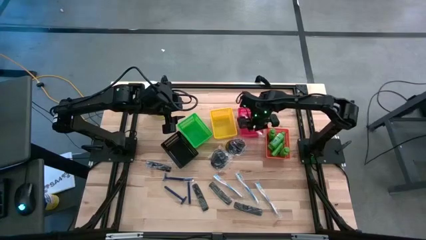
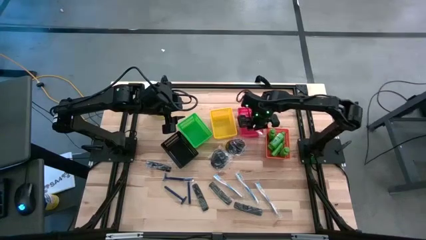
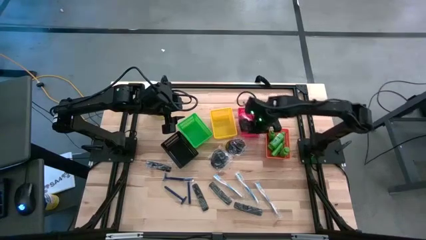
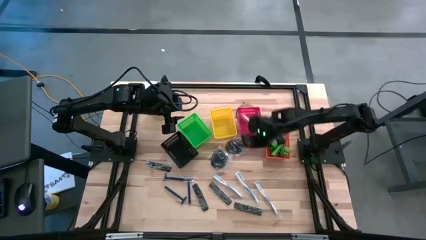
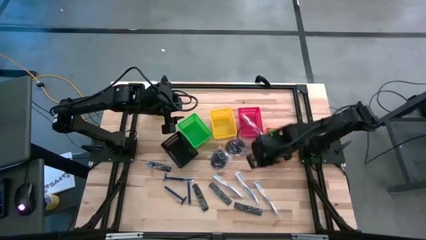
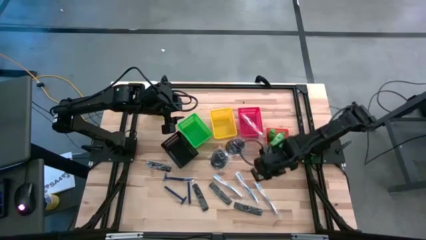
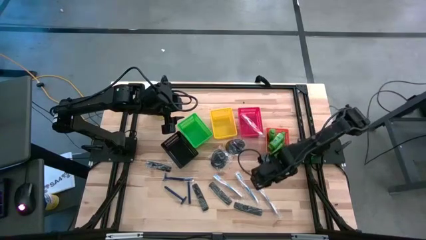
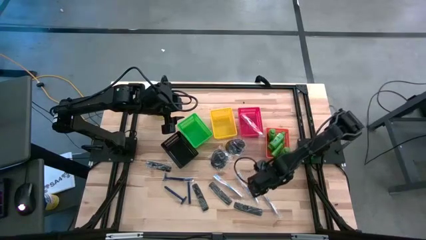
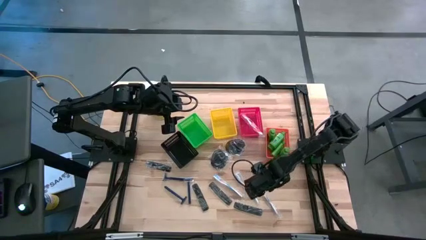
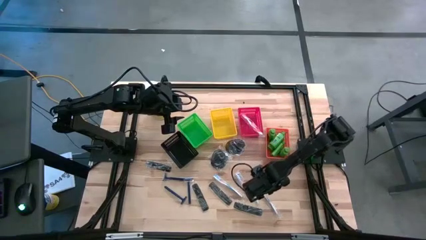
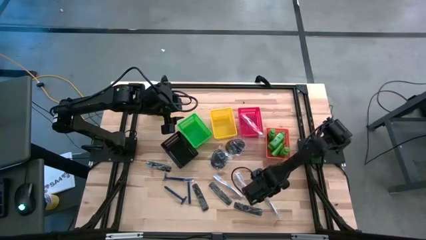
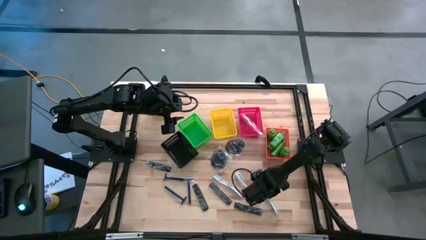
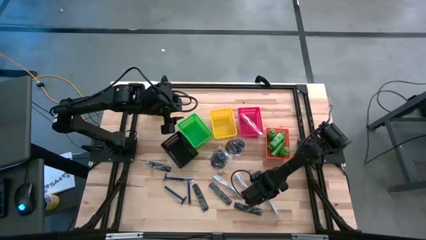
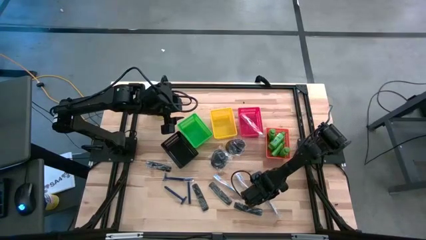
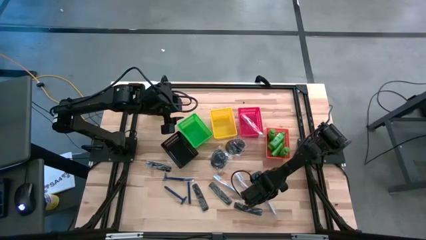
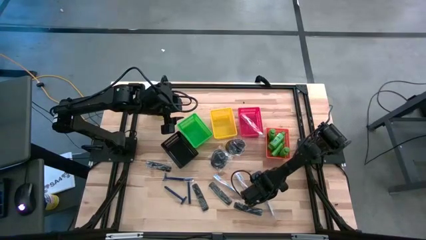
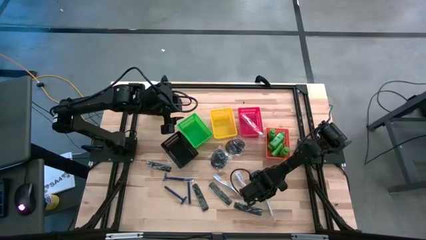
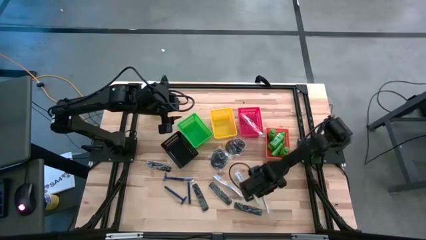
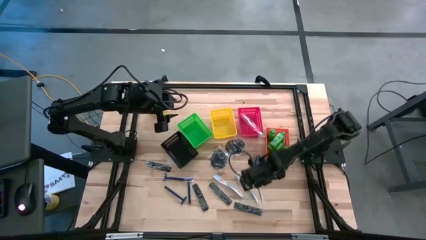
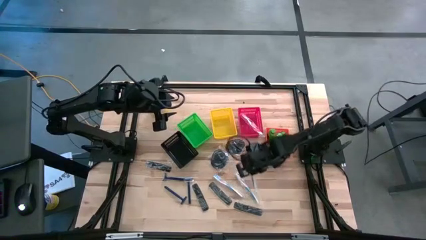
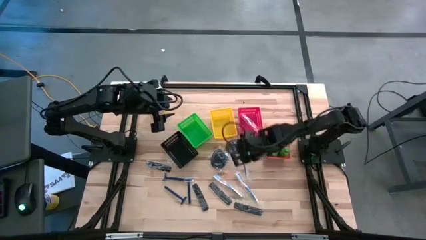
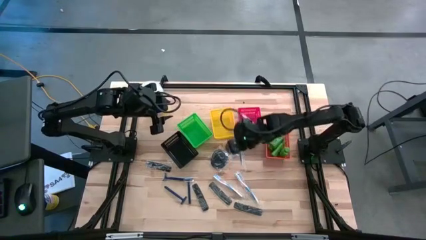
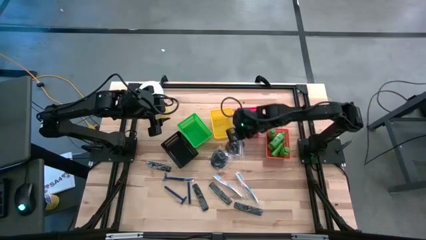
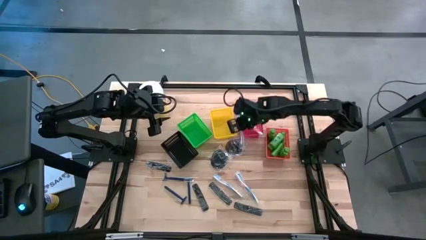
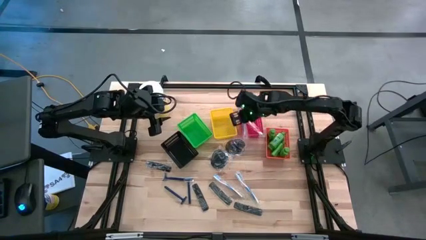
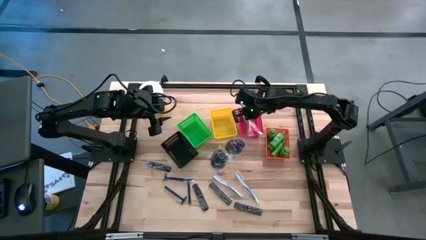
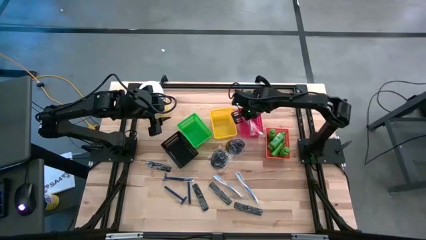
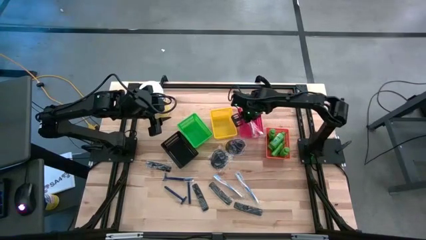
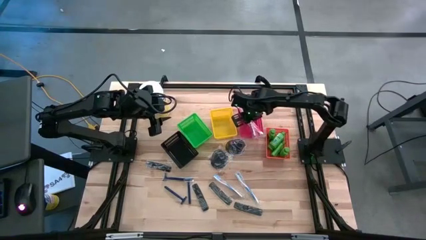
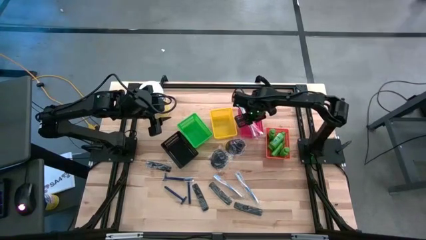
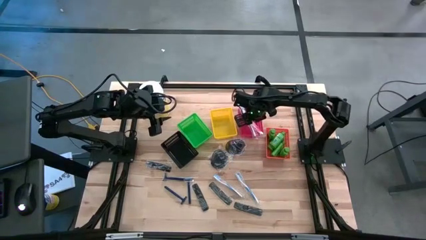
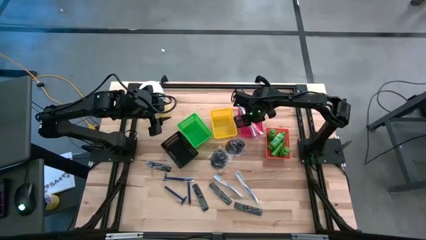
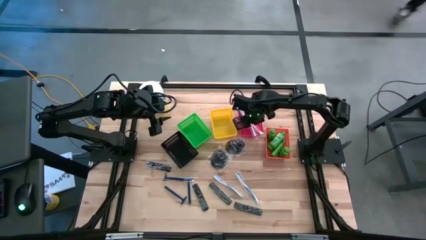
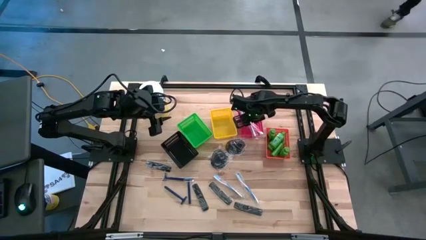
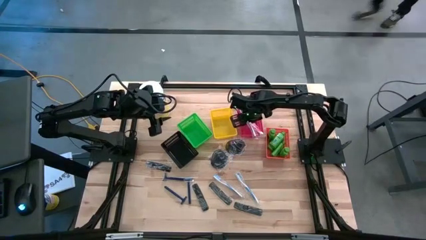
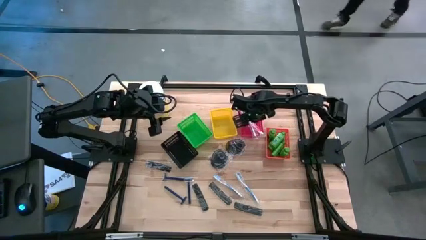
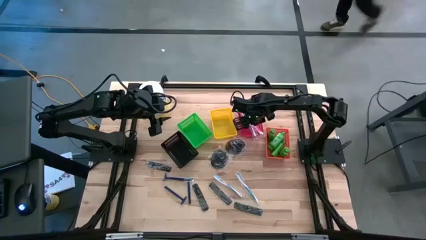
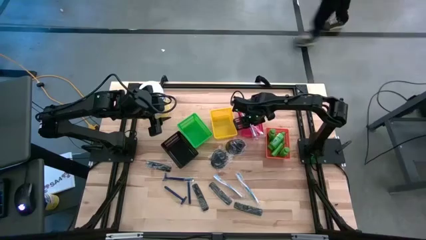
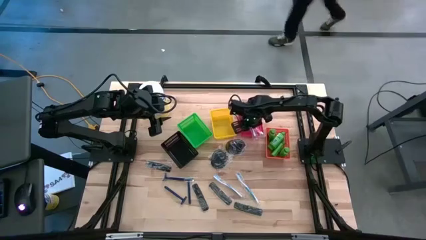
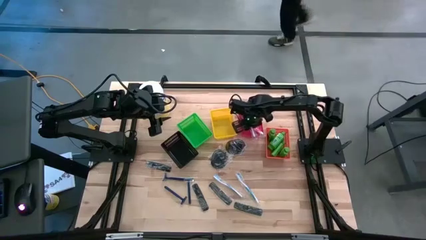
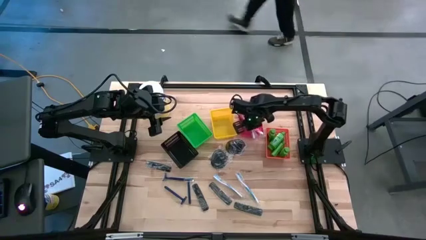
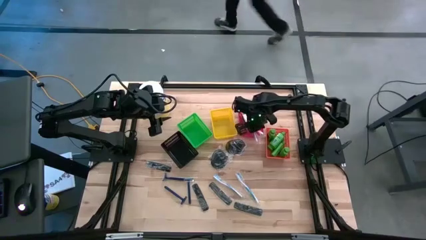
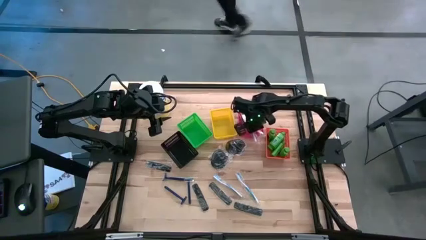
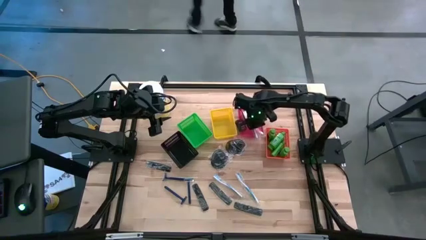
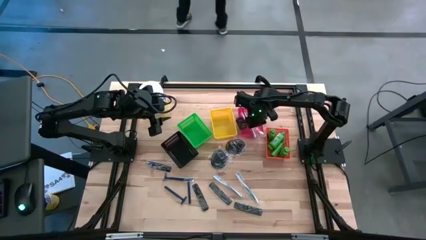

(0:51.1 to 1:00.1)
Task: Pick & Place Travel size toiletries
Put the blue toothbrush into the red bin

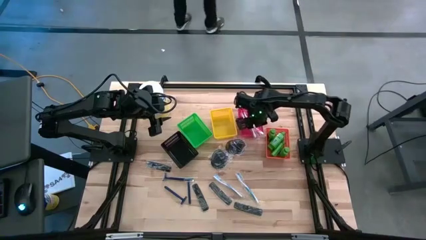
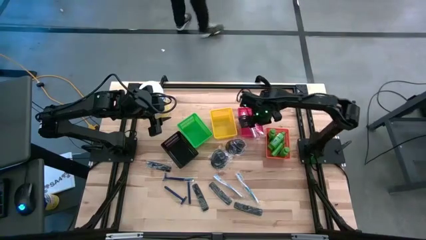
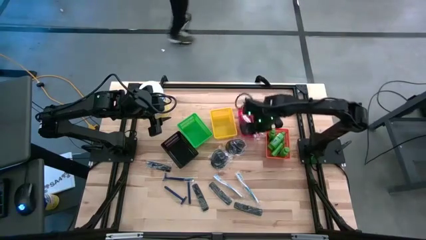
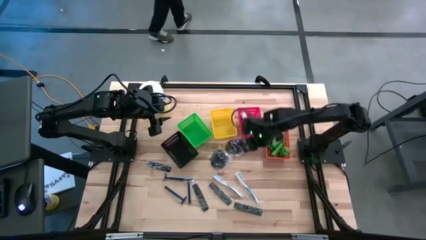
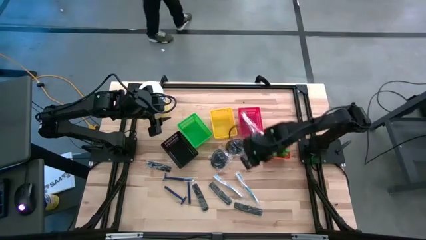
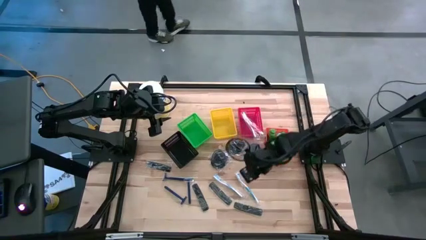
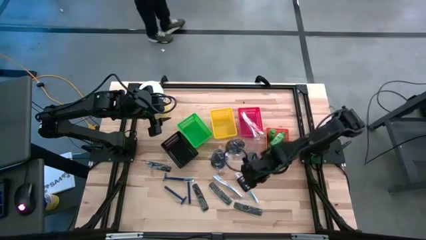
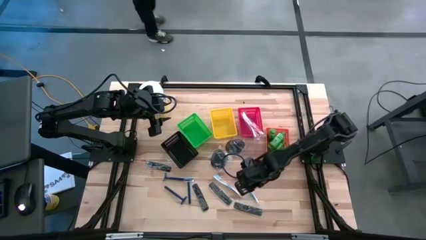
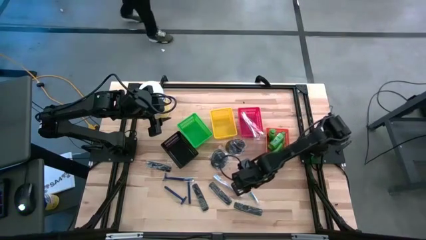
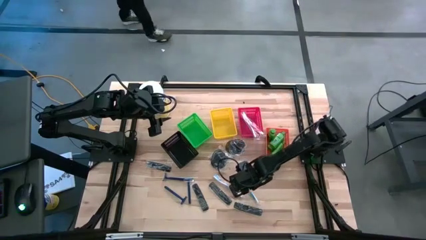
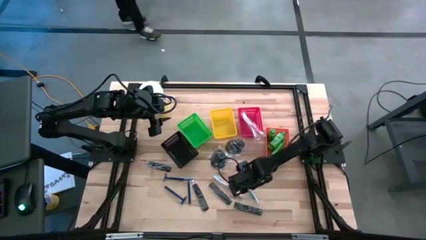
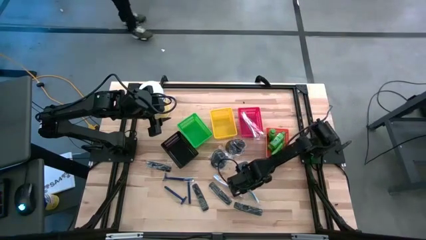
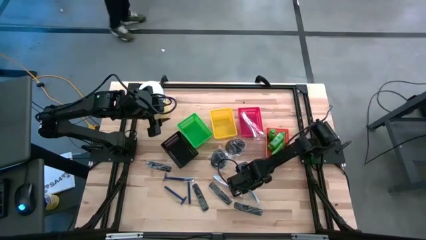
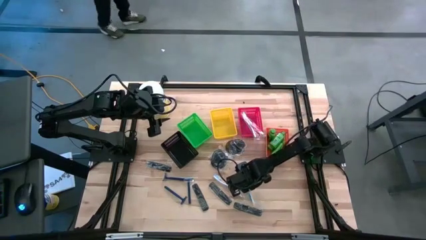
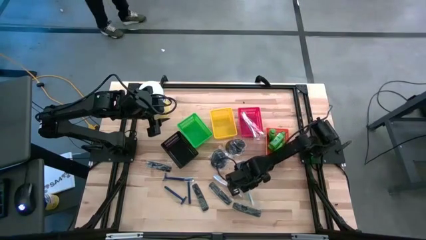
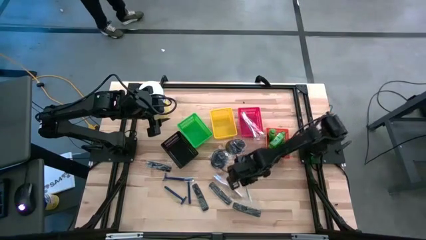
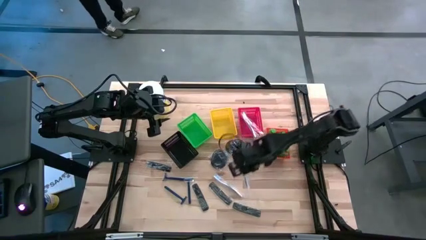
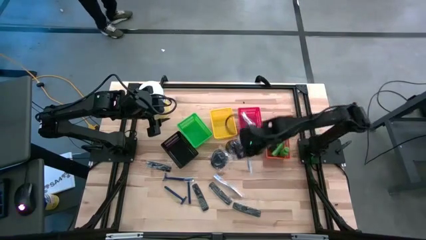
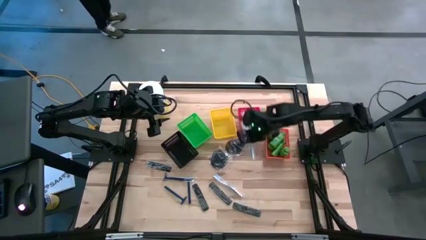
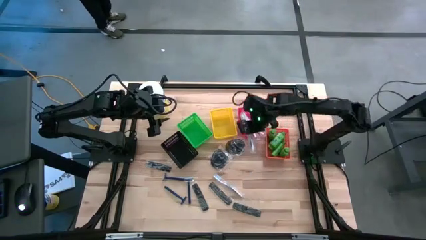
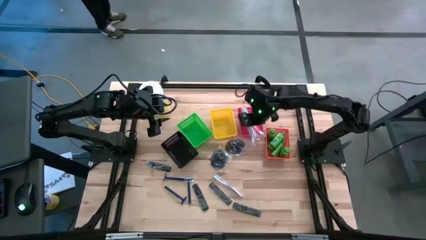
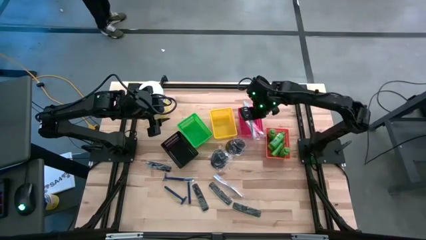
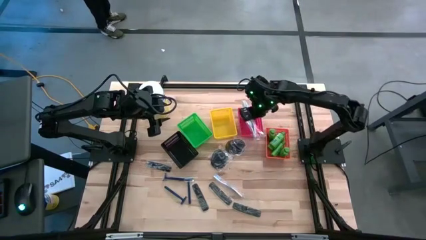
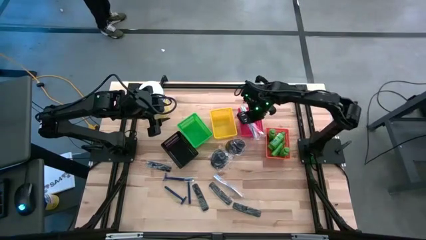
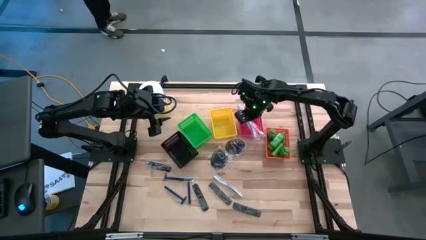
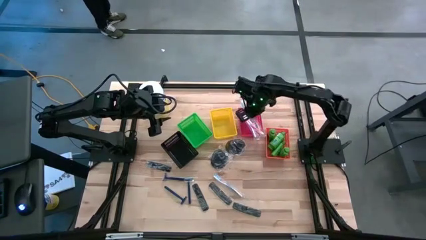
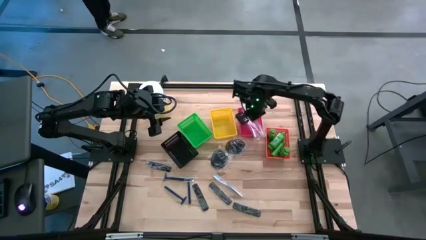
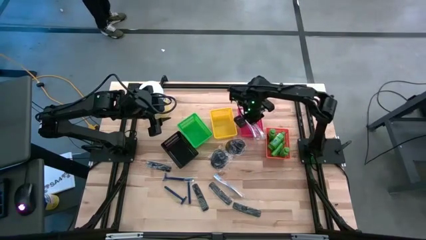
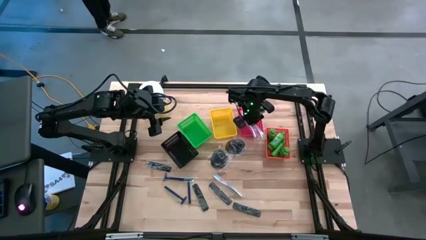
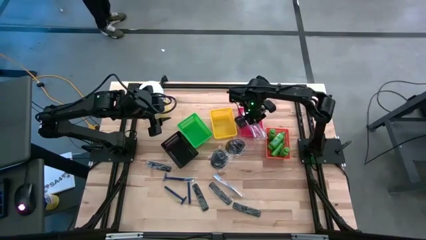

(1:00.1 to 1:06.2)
Put the blue toothbrush into the red bin

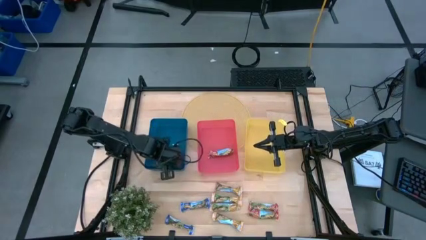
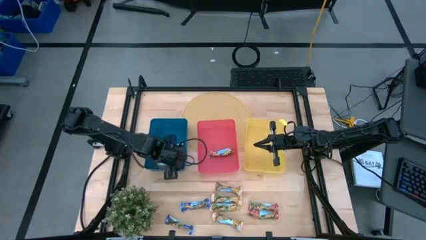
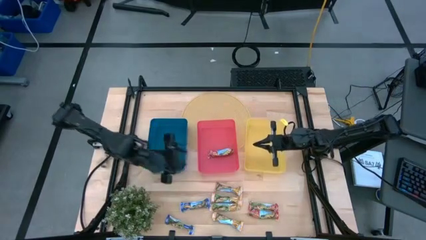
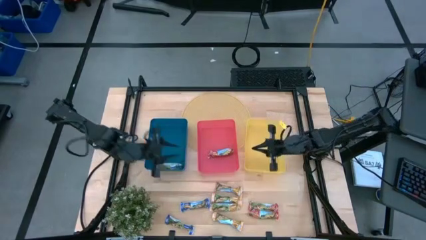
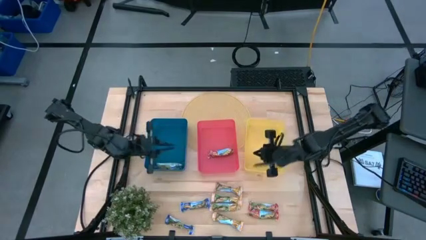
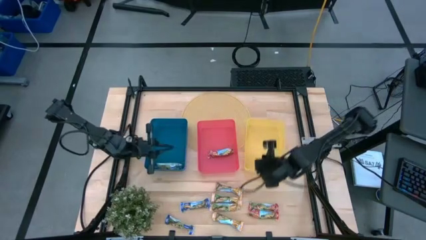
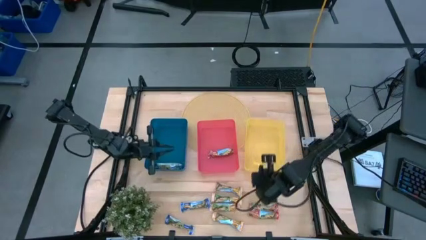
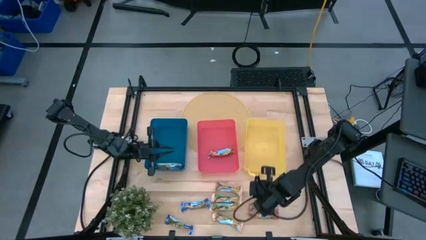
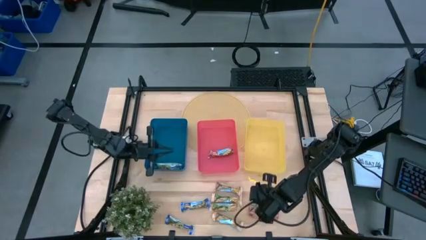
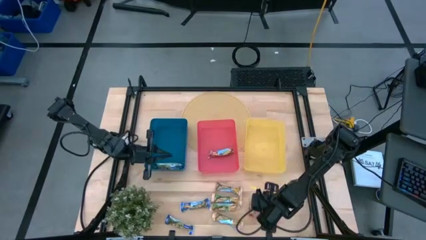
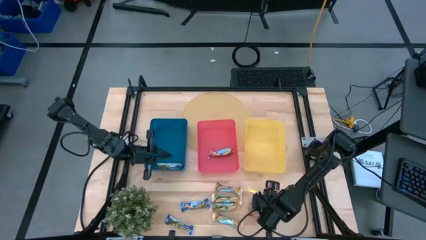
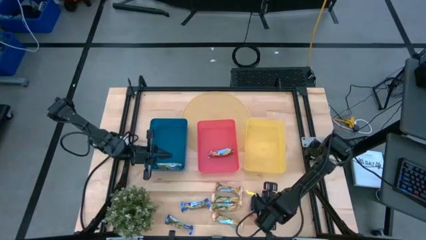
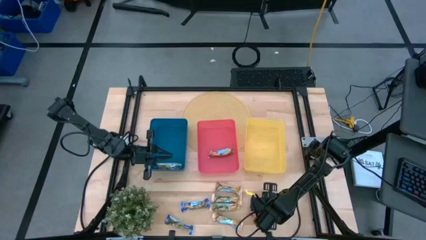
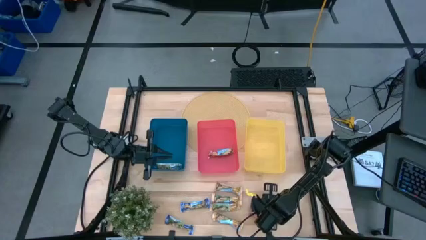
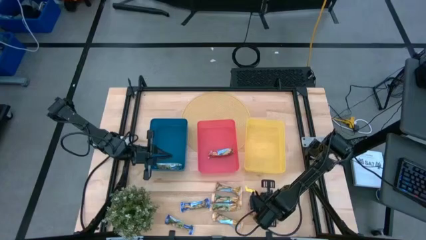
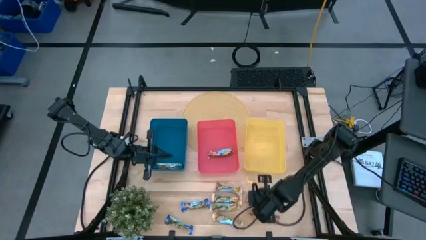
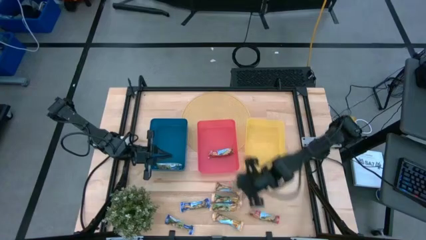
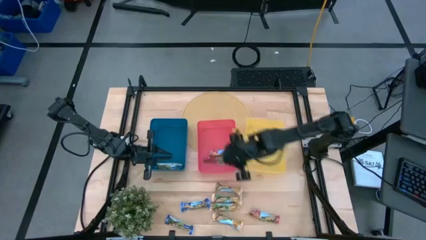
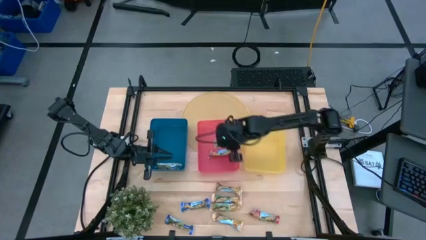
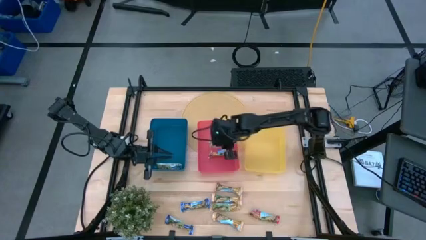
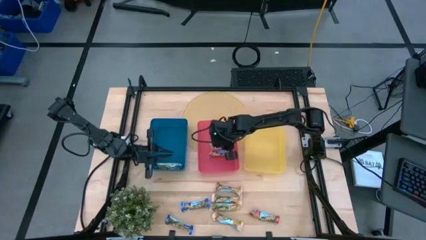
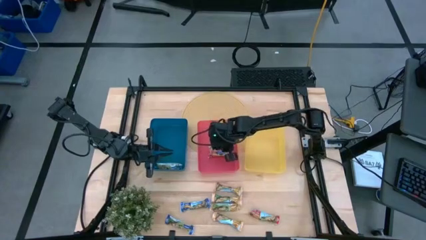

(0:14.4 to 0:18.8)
Task: Pick and place Granola Bars by type
Put the red granola bar into the red bin
